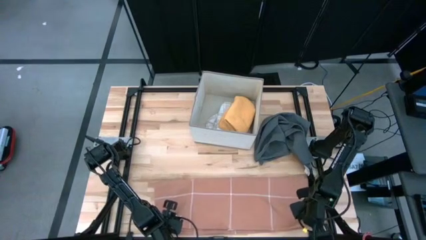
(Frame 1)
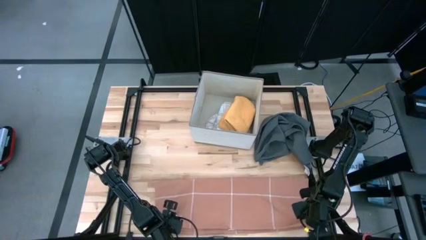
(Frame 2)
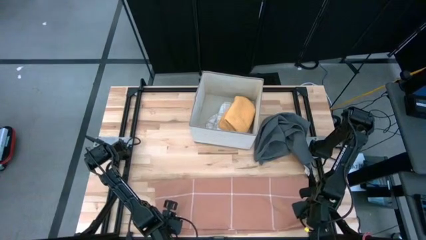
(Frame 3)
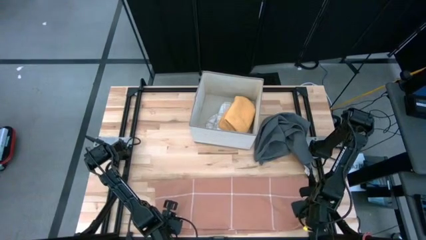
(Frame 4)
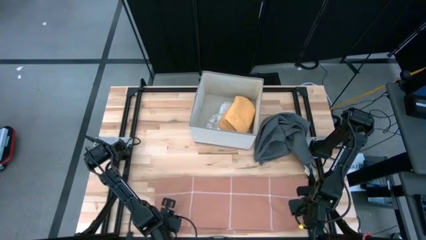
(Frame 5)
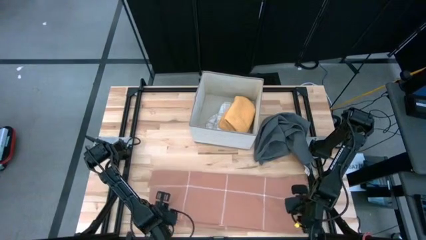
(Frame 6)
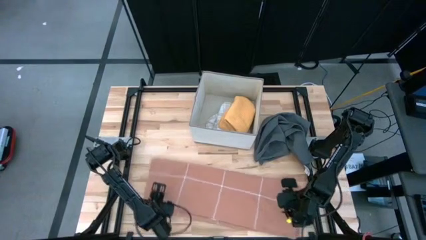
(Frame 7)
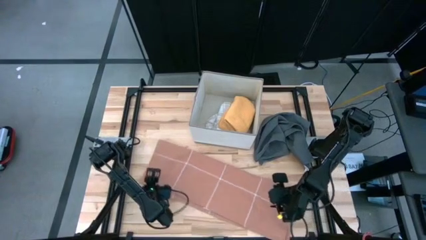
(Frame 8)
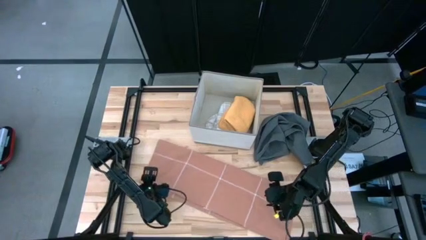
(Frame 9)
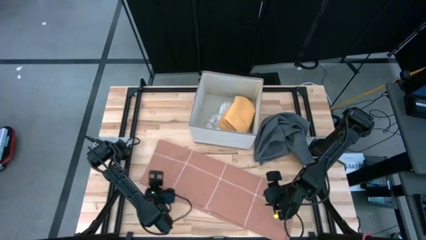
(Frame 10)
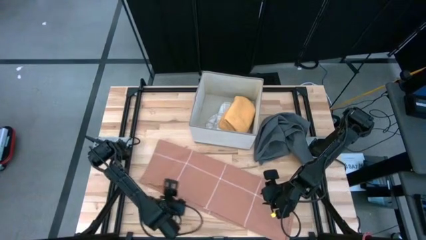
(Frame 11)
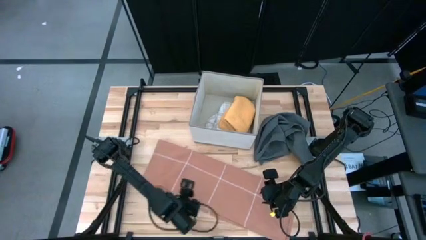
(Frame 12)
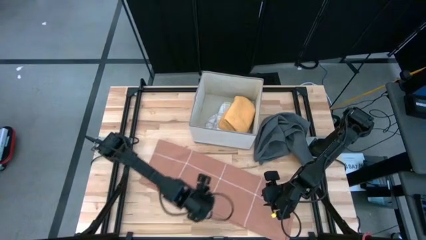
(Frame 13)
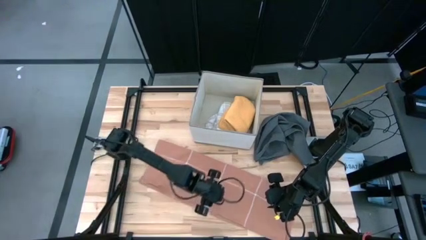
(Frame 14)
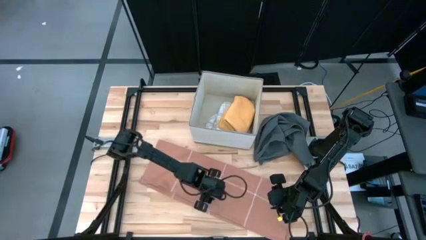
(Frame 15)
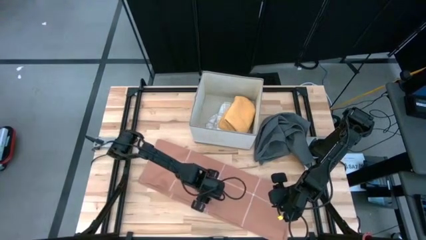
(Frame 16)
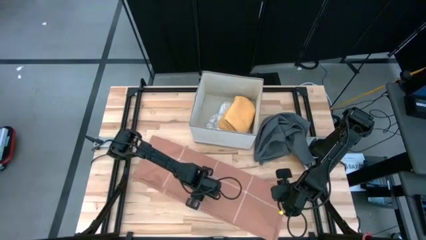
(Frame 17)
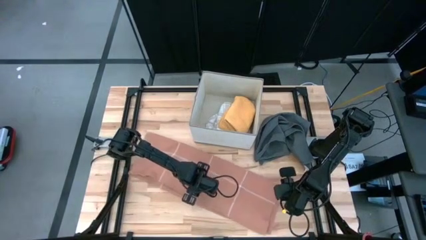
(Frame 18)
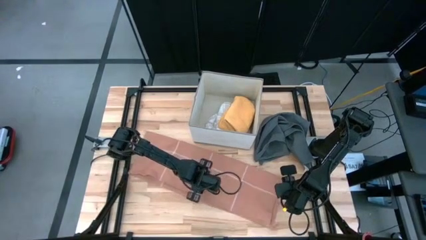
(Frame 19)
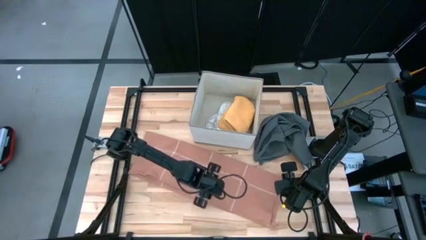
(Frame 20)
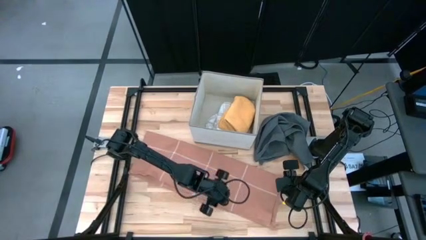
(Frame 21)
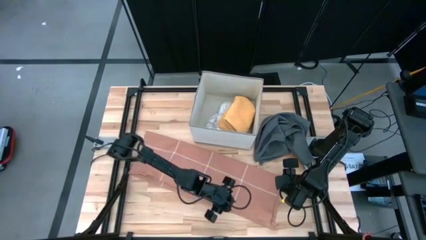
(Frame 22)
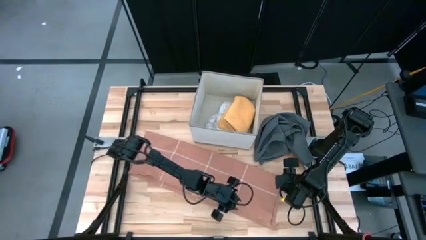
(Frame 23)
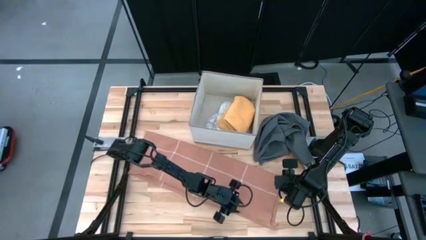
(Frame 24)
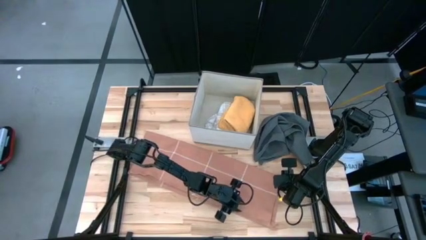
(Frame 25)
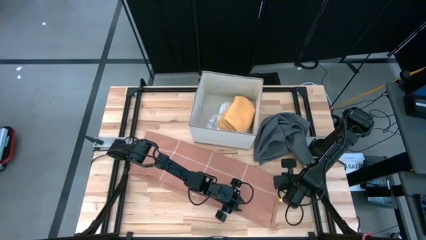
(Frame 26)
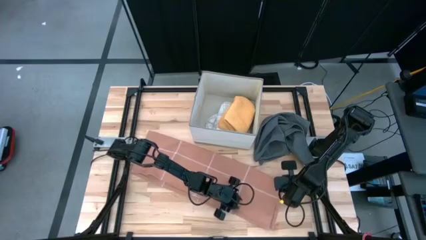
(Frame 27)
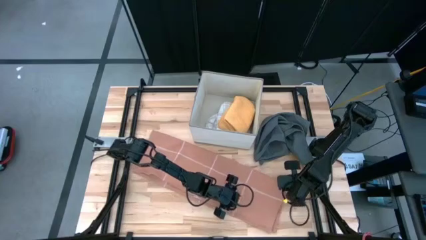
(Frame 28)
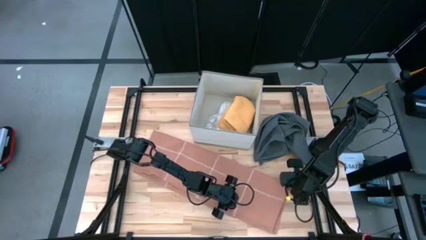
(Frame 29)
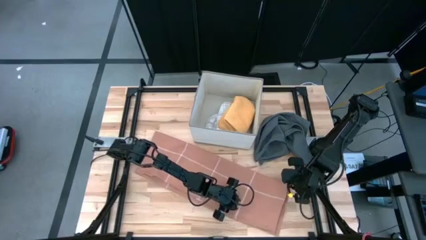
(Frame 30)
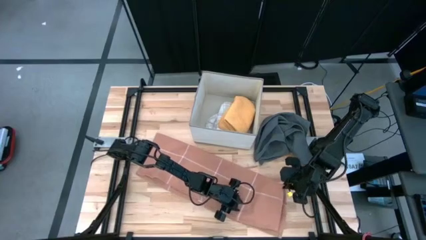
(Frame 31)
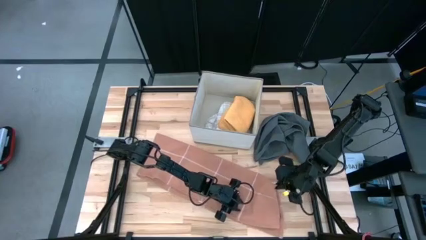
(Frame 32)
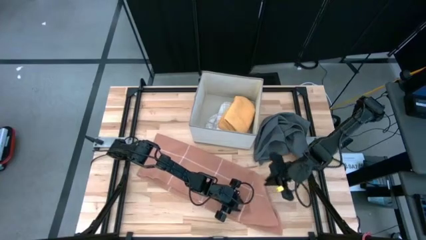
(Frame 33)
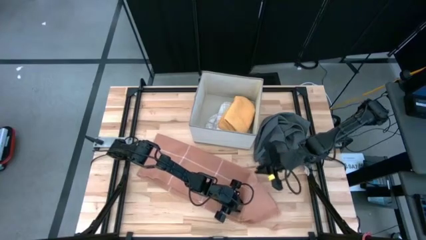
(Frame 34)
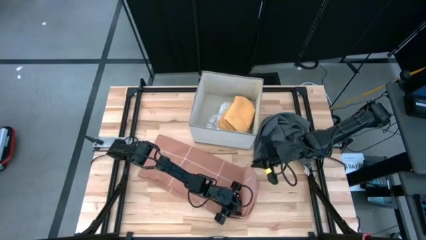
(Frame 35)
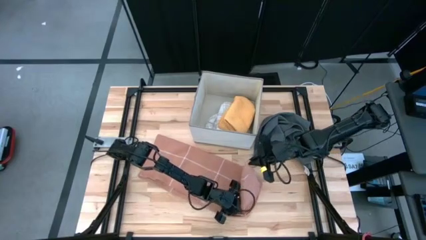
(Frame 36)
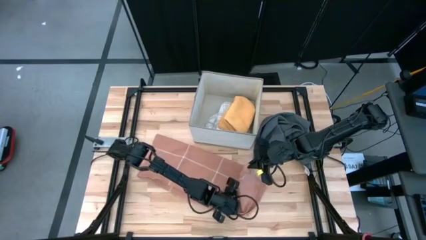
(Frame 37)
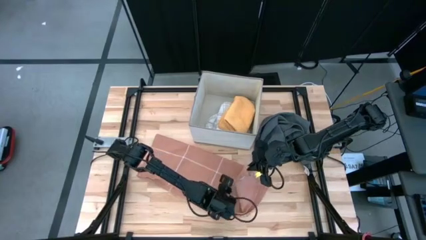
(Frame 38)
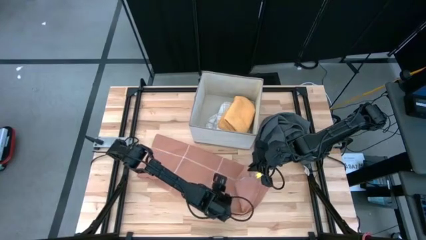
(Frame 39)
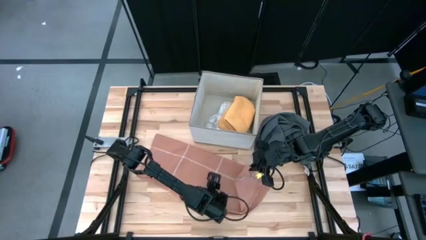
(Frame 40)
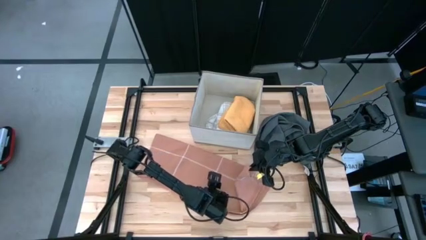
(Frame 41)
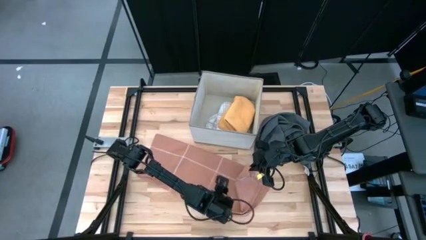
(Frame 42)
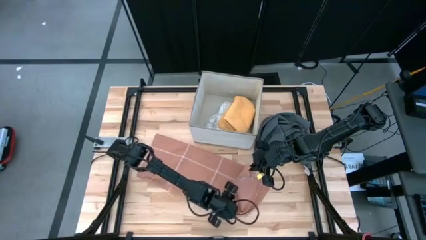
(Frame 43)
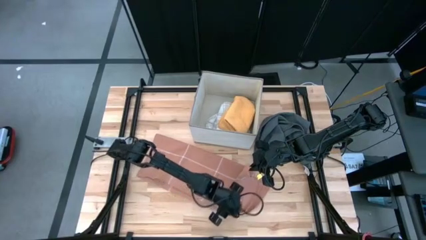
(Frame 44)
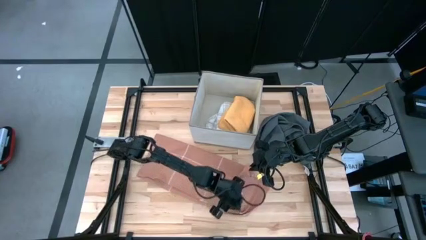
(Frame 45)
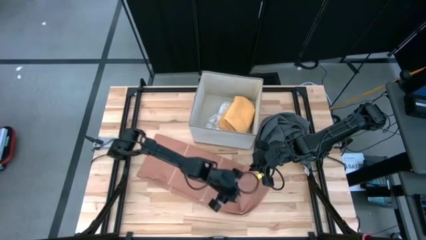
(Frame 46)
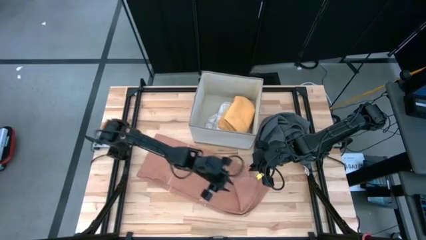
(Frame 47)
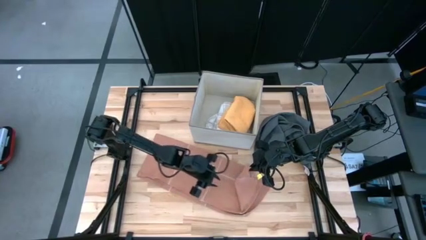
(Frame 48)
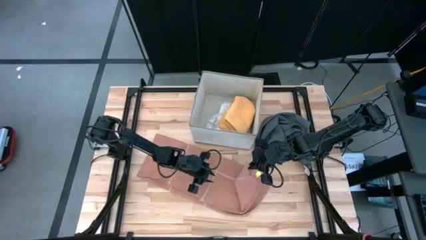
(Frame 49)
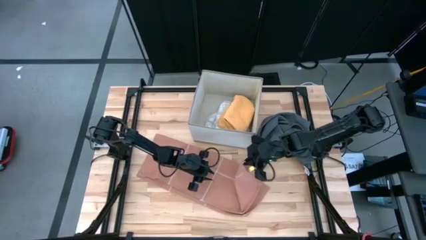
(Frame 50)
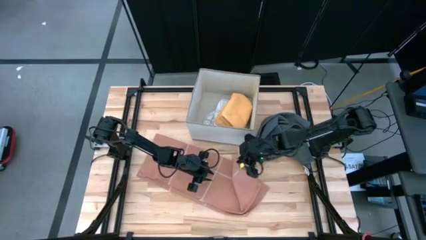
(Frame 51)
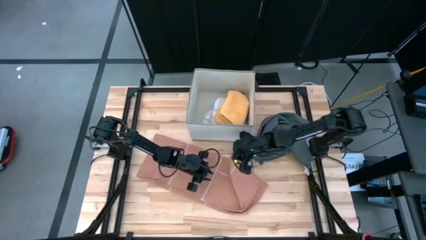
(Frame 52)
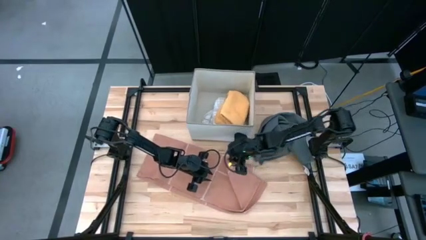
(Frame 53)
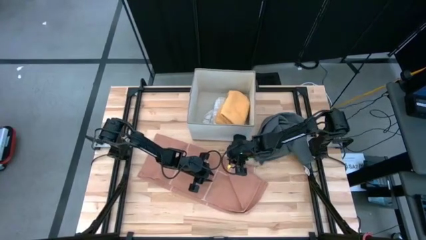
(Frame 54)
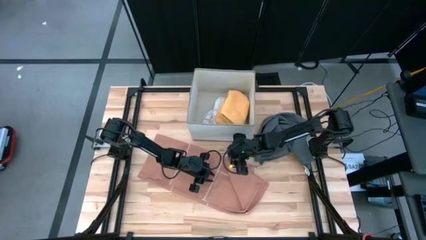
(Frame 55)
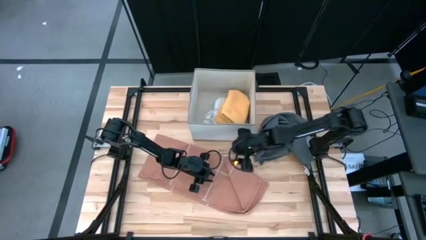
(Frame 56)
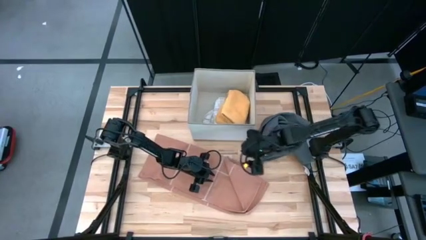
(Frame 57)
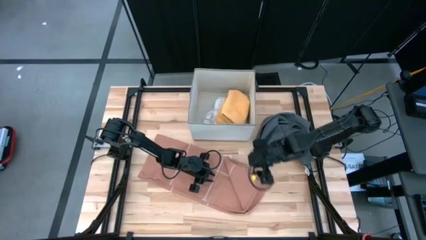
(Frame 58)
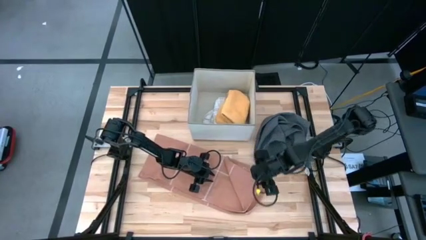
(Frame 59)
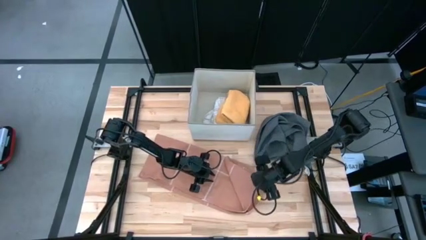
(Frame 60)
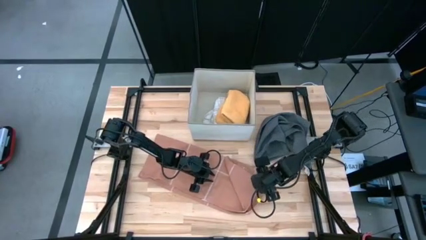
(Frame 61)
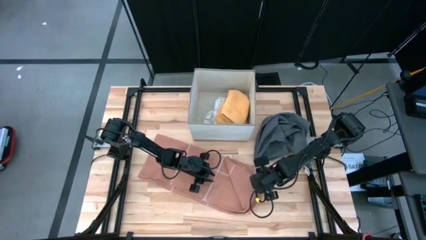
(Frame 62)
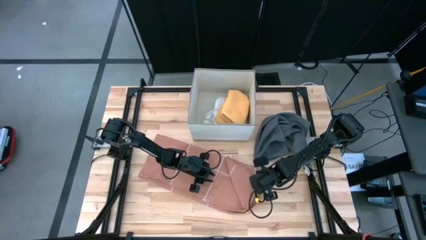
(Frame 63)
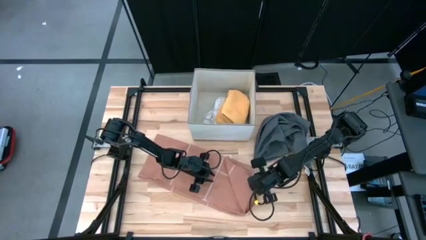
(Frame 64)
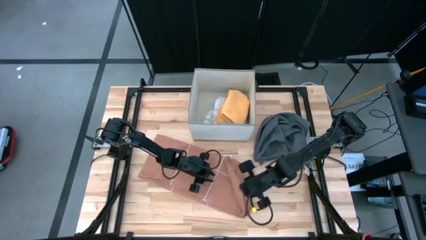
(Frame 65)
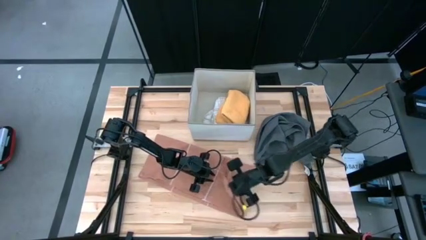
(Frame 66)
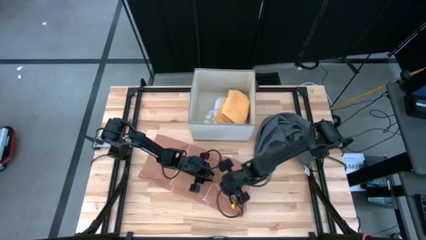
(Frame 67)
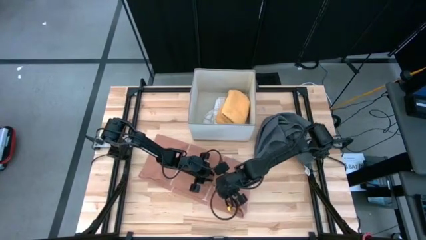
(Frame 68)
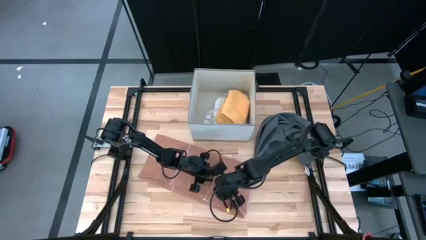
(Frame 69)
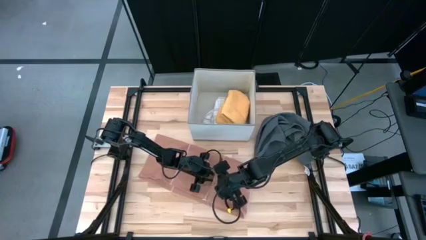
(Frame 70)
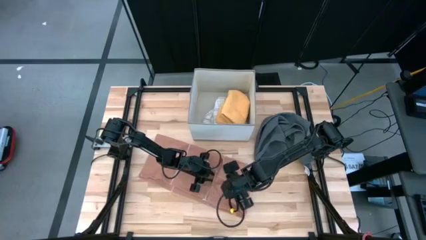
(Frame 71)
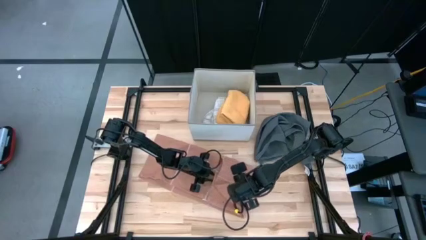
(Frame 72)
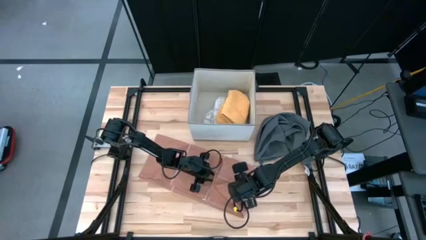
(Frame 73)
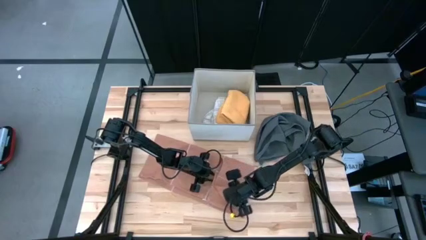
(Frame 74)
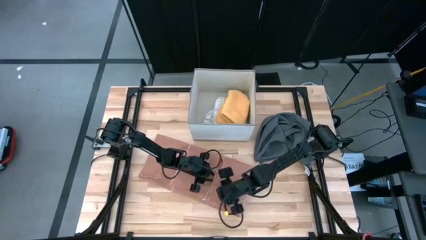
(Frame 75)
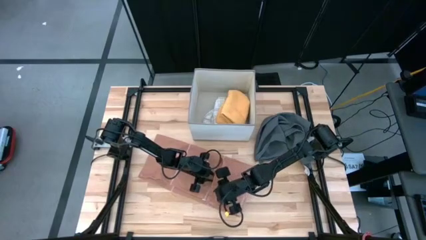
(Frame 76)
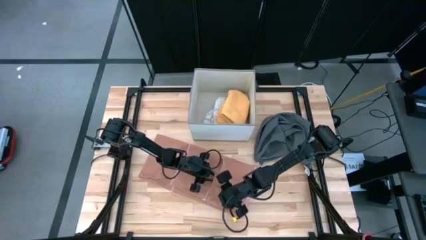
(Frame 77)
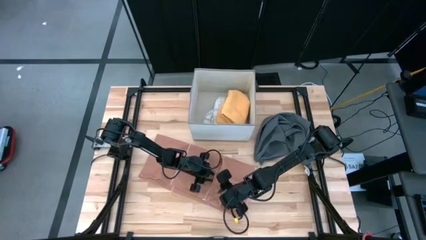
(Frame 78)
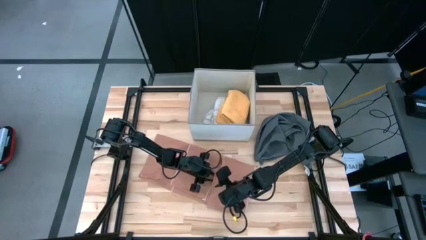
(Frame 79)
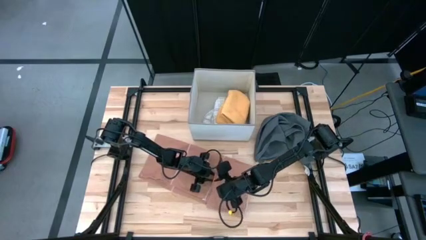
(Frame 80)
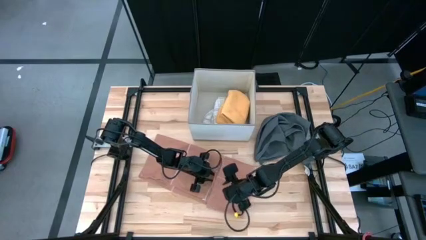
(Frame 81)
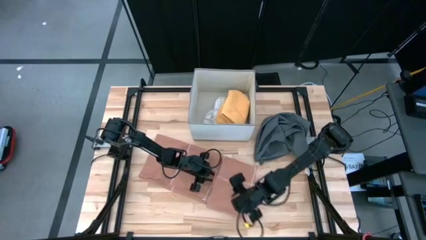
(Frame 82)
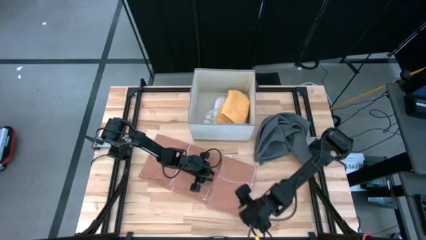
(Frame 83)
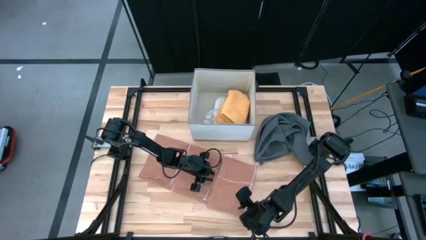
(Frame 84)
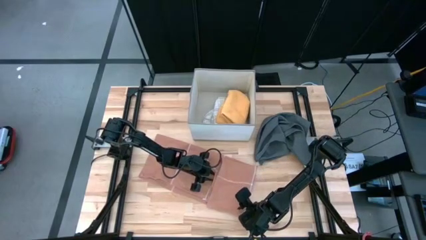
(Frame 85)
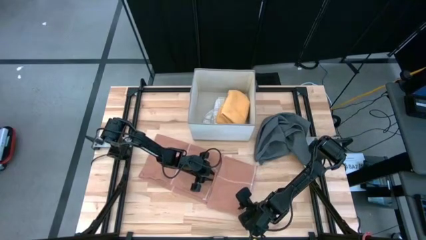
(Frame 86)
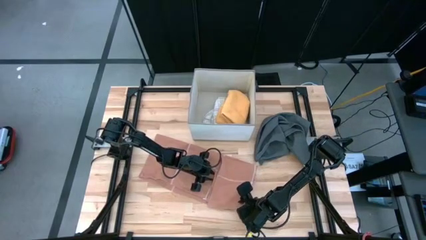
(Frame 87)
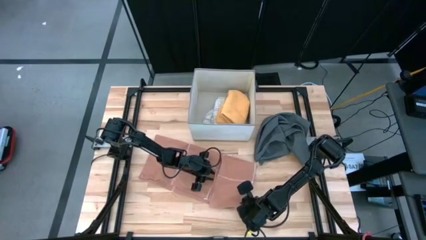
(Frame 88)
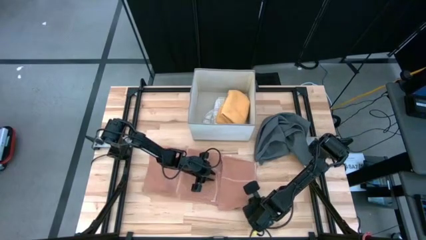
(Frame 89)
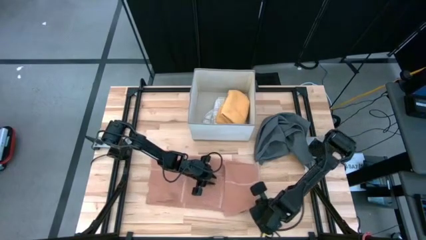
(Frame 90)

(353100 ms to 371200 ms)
Task: Fold towel
Fold the light orange towel
